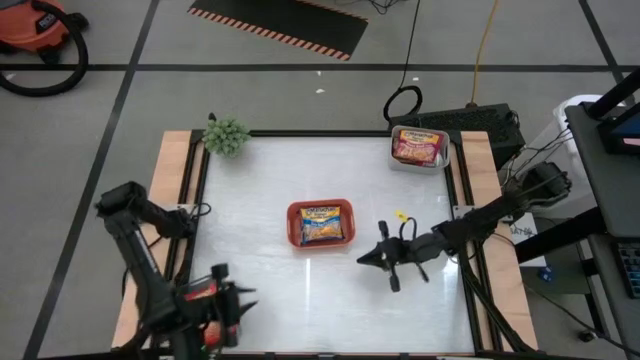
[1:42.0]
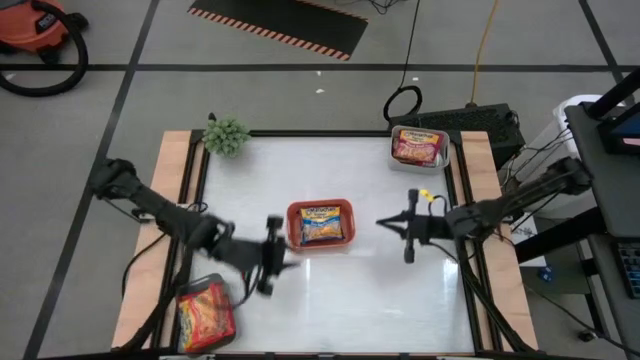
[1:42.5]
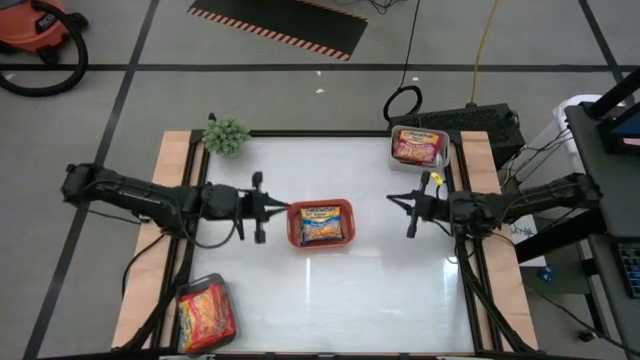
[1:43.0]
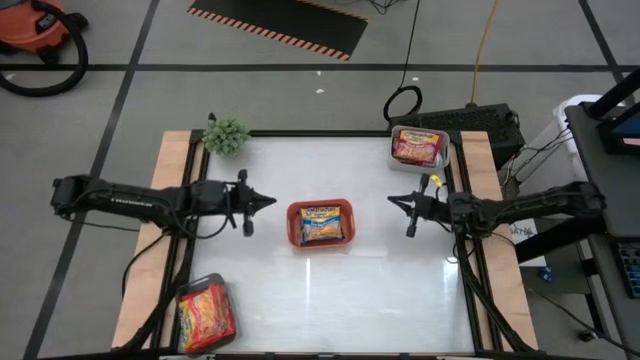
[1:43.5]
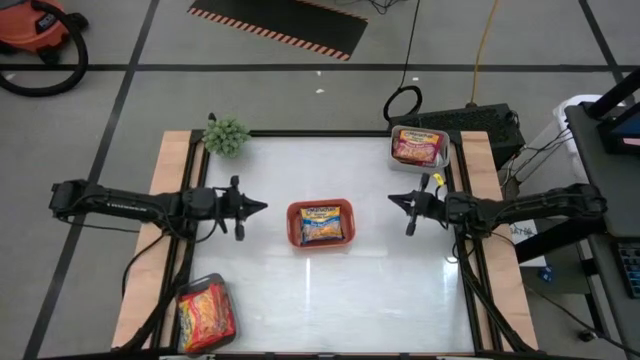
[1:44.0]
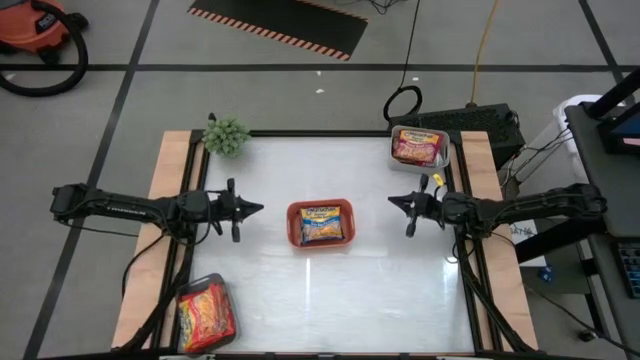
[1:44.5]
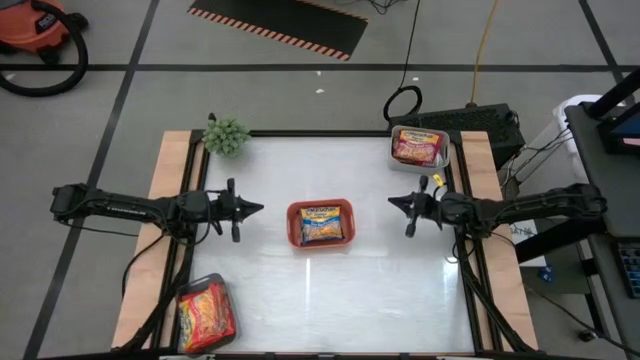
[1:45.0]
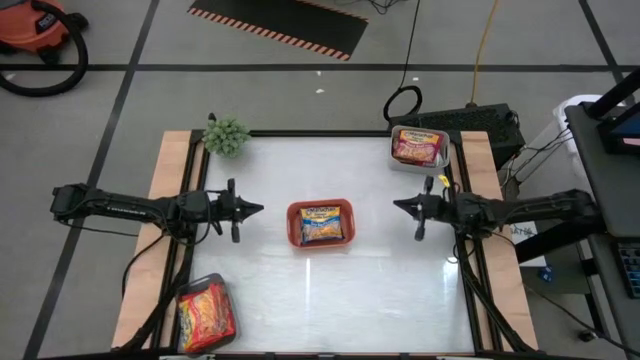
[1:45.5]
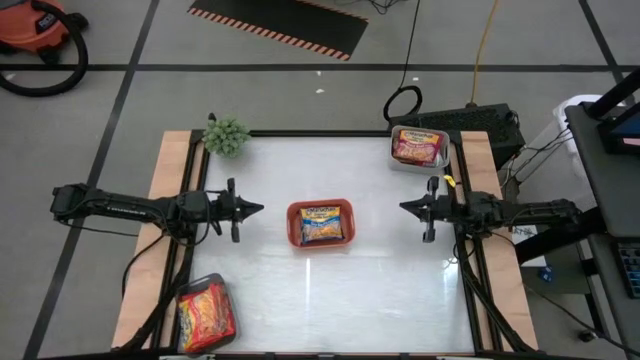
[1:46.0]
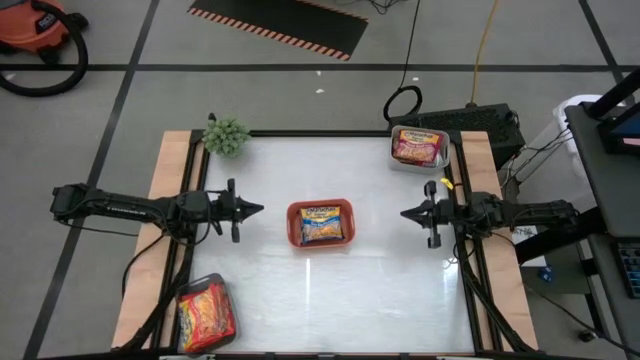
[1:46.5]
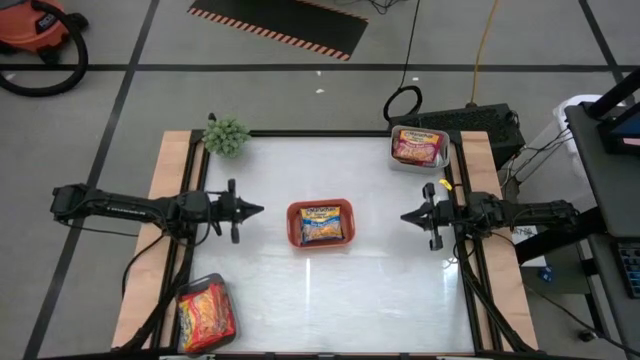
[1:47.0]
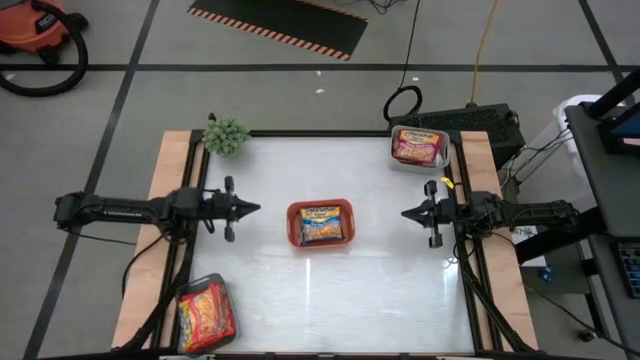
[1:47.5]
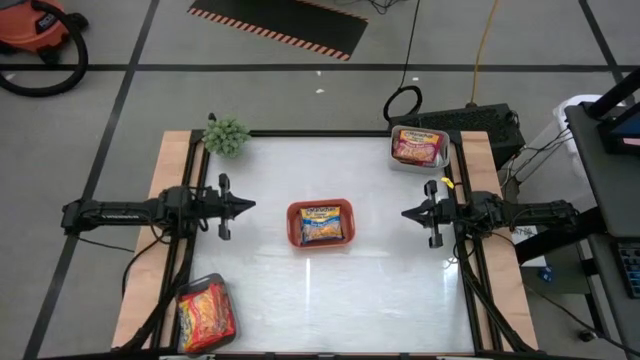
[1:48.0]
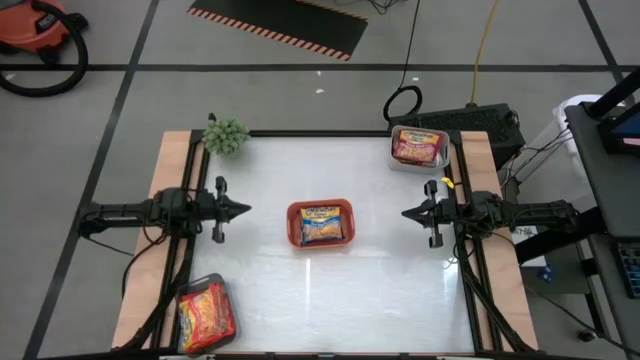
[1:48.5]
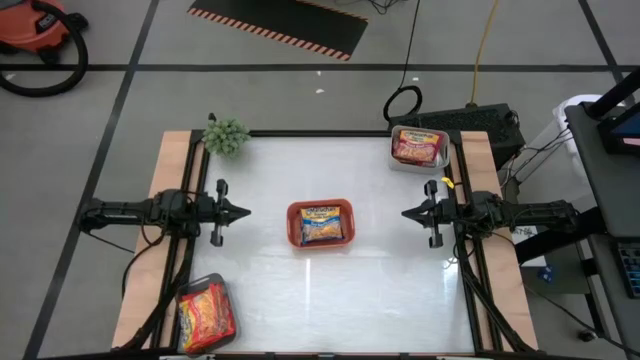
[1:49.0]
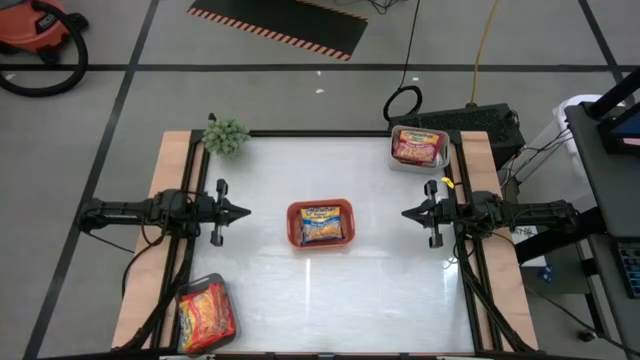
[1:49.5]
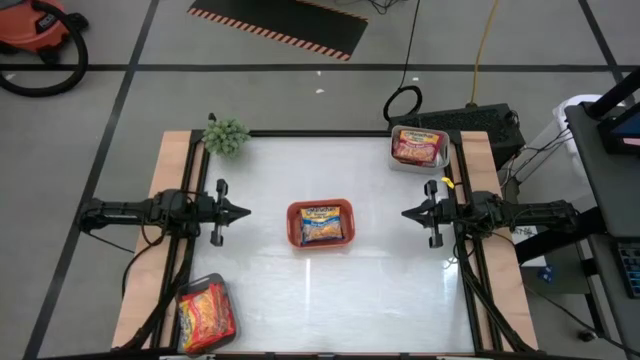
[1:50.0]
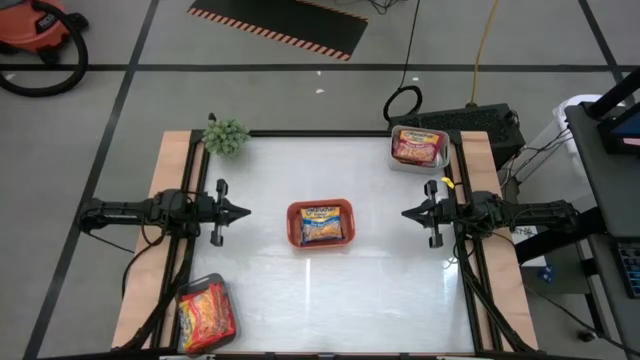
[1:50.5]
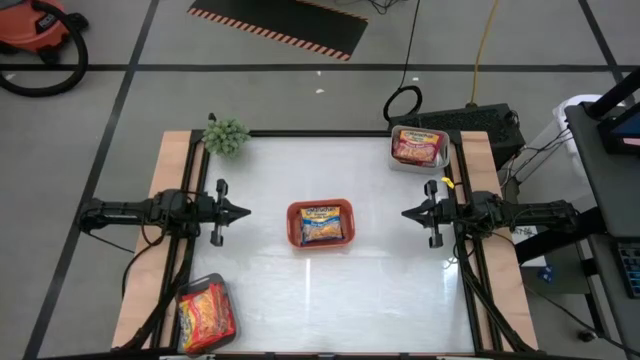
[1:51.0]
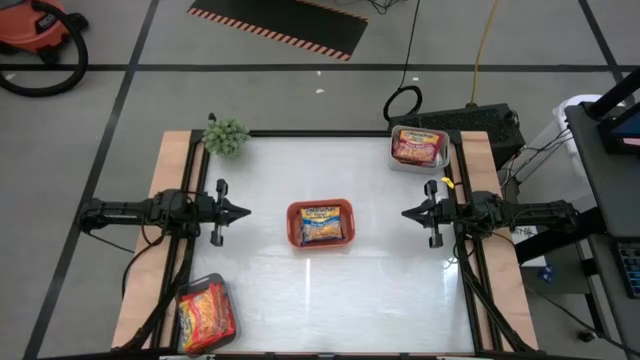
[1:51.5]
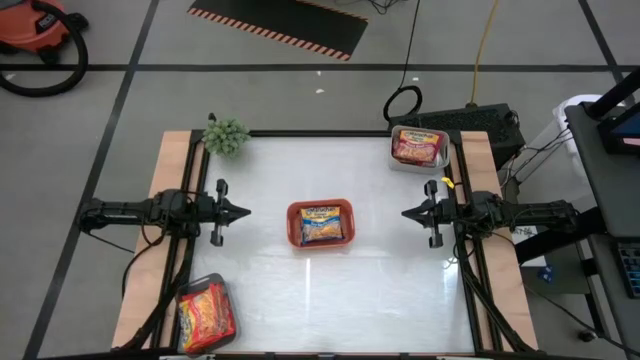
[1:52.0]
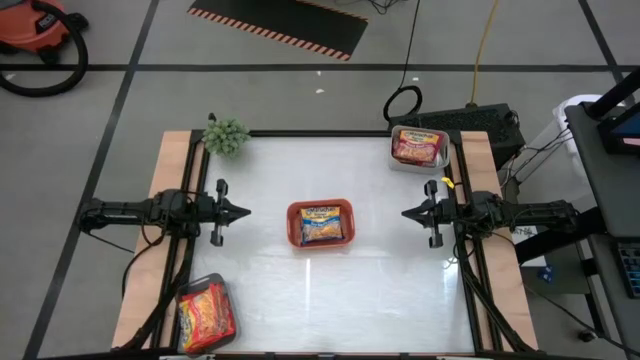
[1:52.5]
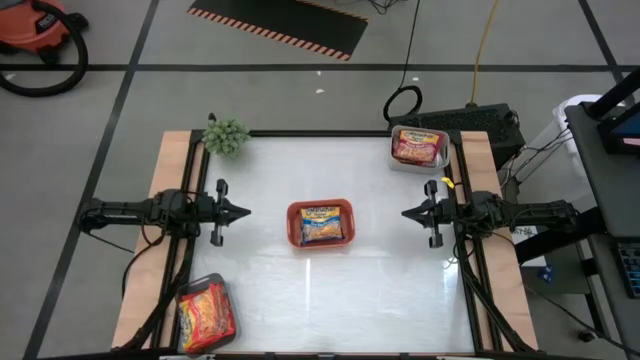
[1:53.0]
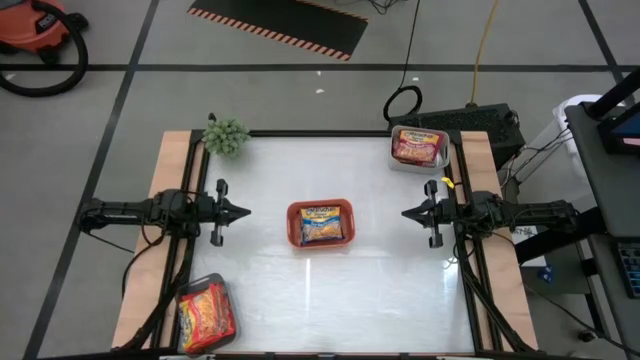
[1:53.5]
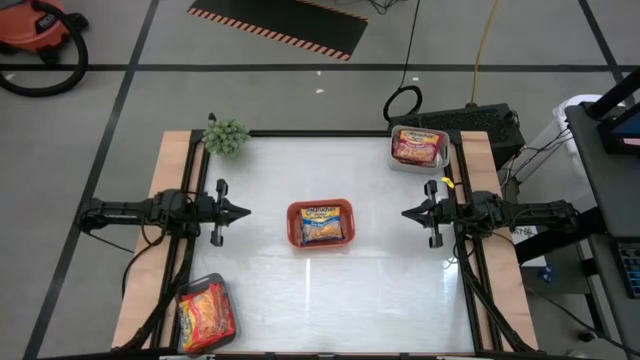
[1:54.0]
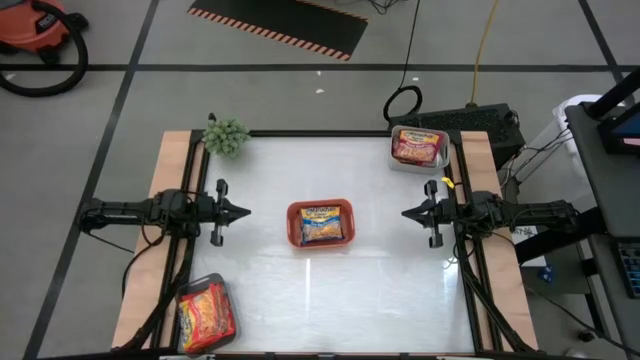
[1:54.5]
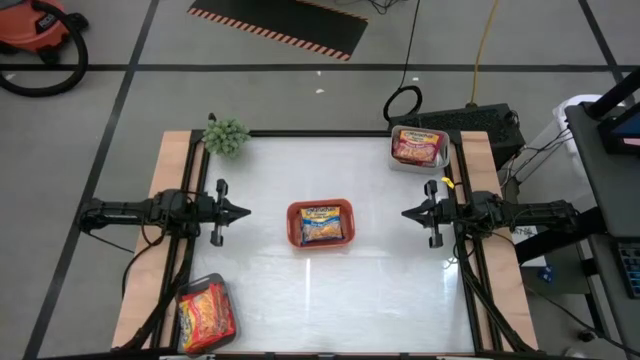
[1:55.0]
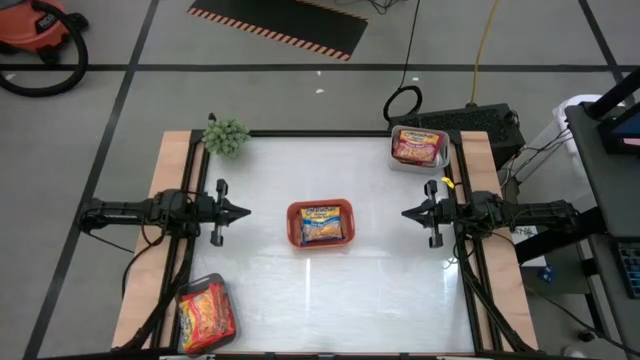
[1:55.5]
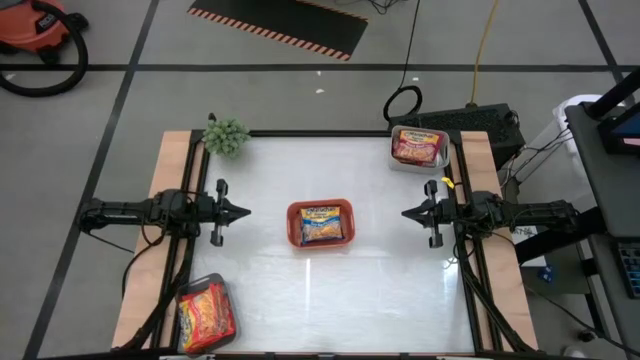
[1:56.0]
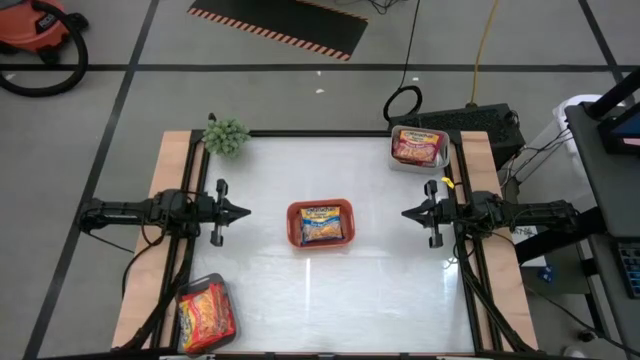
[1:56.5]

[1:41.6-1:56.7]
Task: Sort Maruchan noodles
Return to Home Position

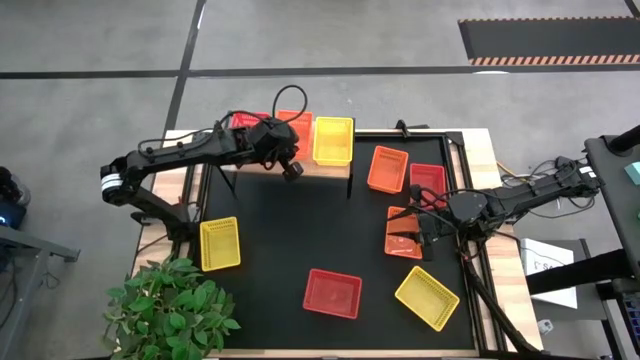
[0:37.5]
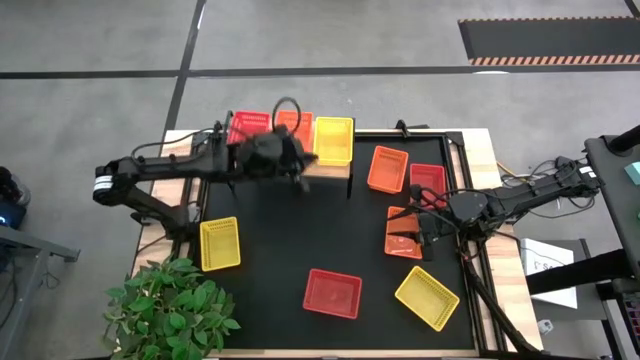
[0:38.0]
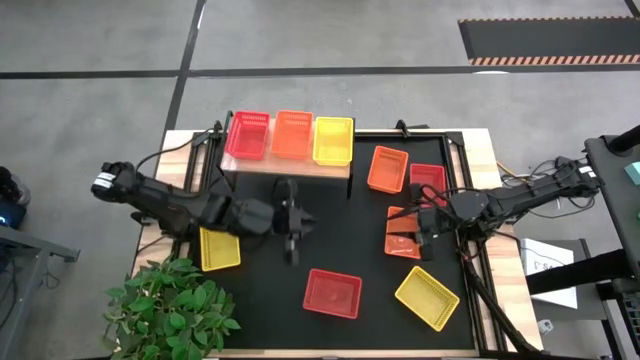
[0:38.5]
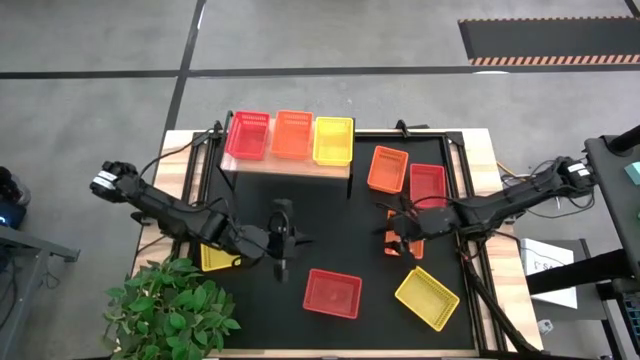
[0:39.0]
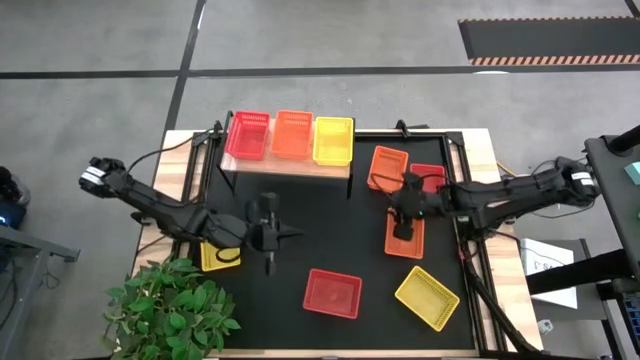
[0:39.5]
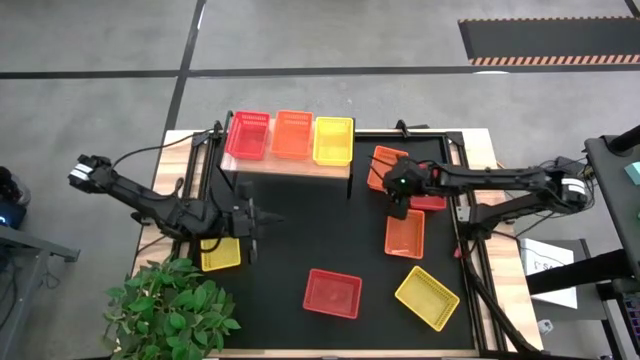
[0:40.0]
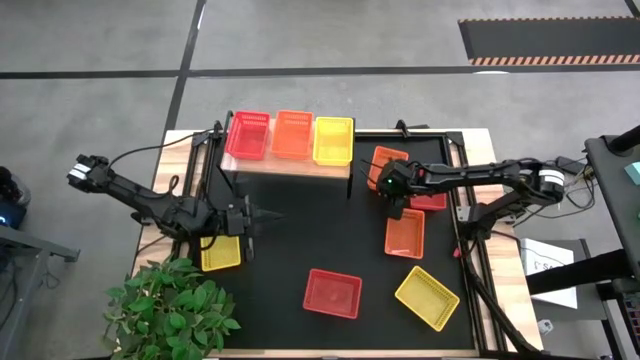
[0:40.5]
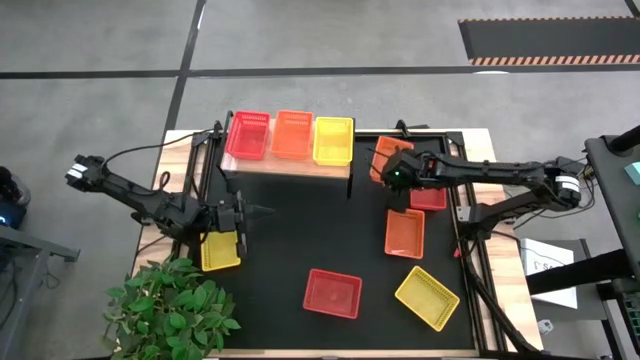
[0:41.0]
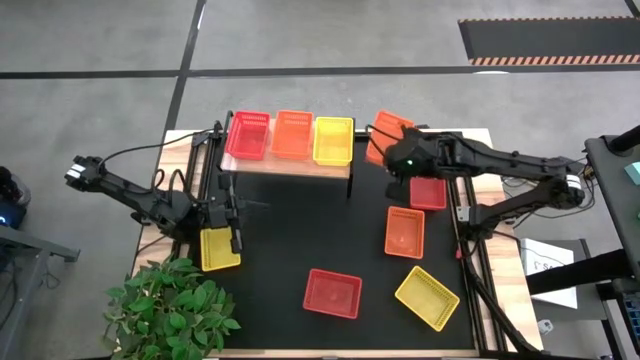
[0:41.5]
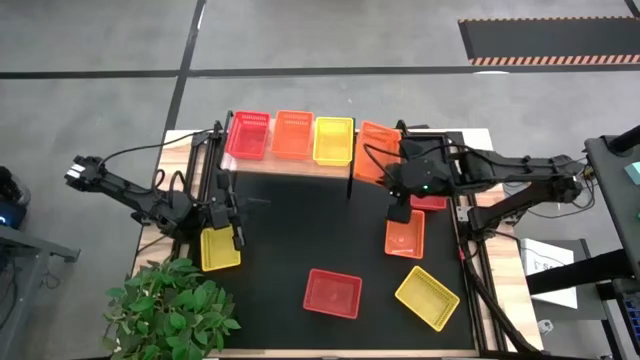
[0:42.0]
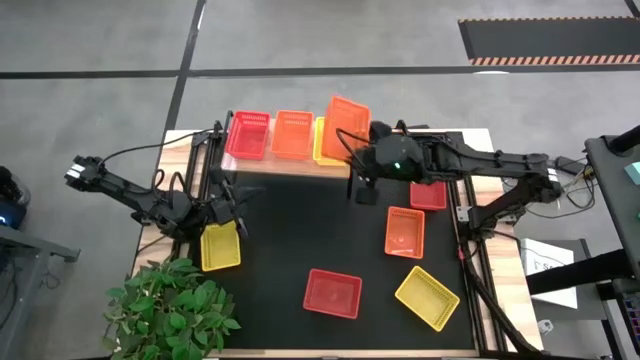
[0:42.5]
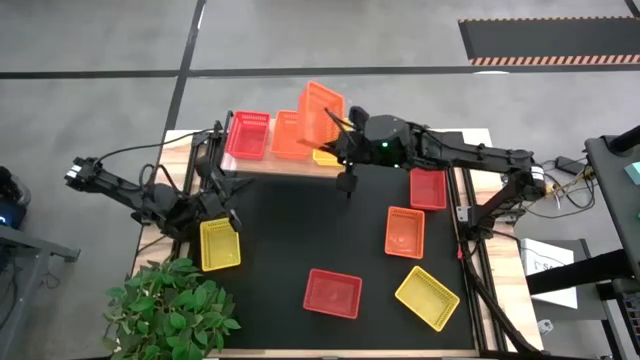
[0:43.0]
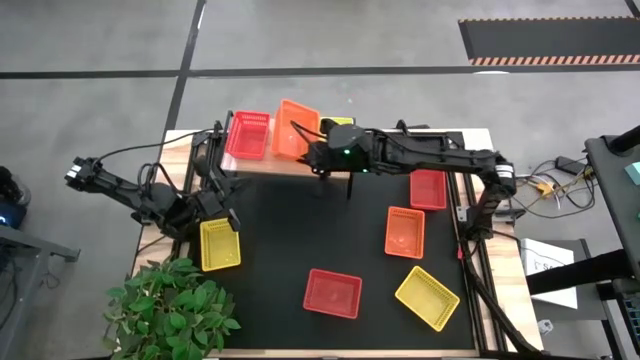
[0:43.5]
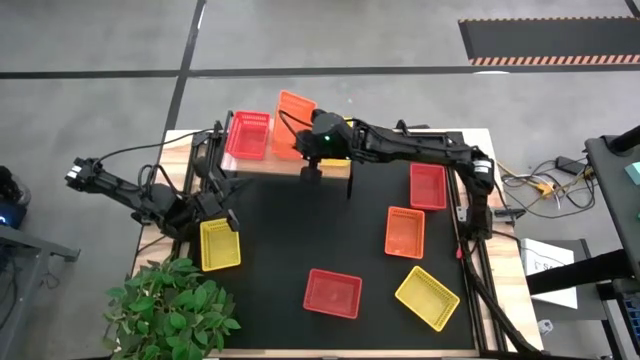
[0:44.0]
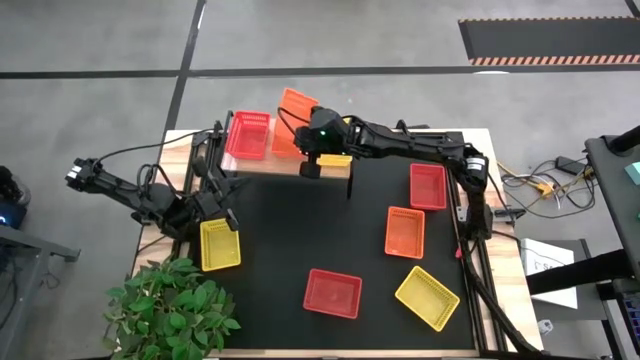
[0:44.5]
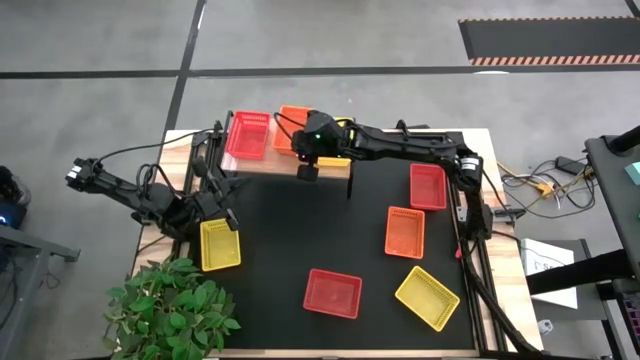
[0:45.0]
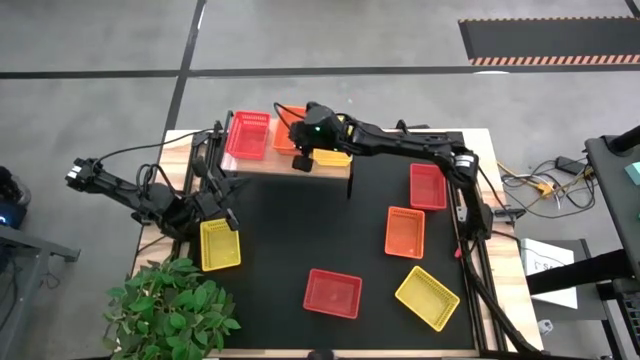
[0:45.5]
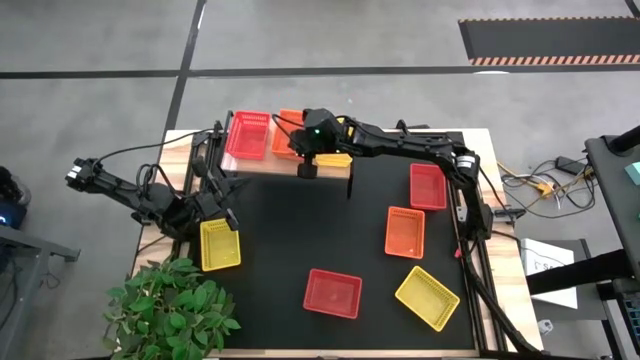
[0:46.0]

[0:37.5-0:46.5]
Task: Stack baskets on shelf by color
Stack the top orange bin on the other orange bin on the shelf
